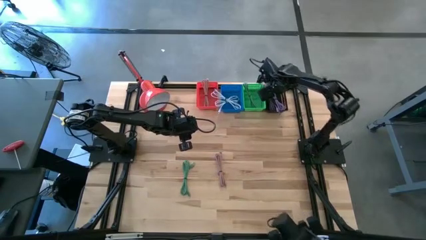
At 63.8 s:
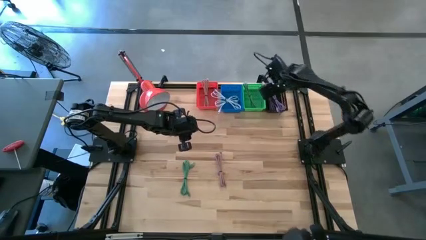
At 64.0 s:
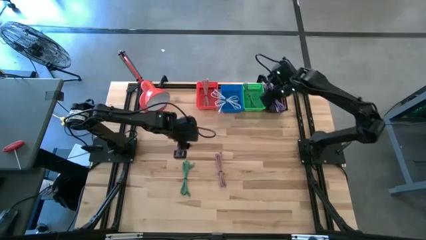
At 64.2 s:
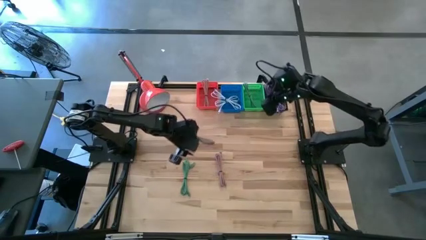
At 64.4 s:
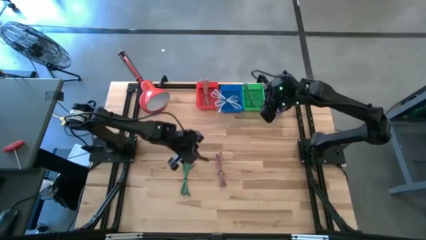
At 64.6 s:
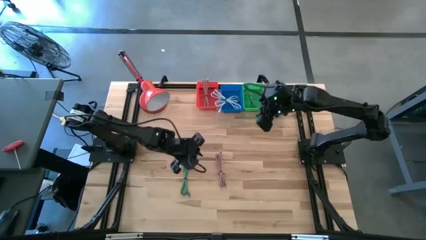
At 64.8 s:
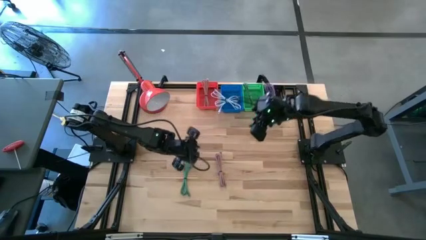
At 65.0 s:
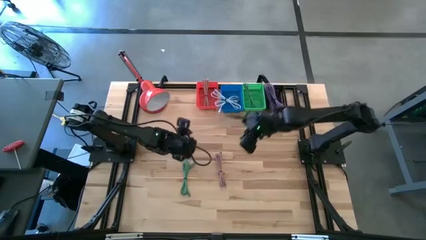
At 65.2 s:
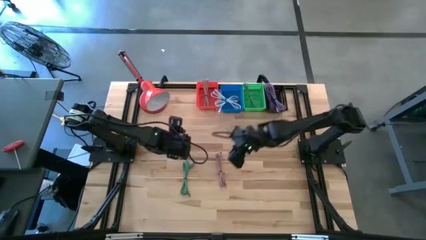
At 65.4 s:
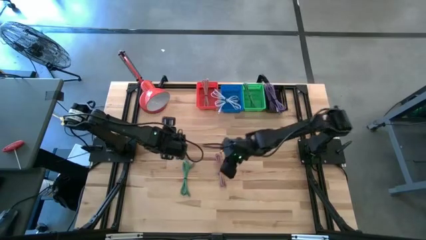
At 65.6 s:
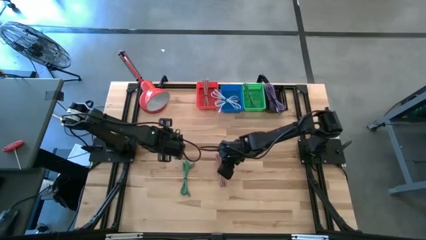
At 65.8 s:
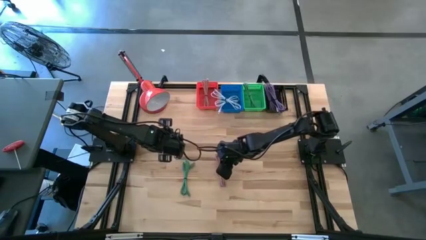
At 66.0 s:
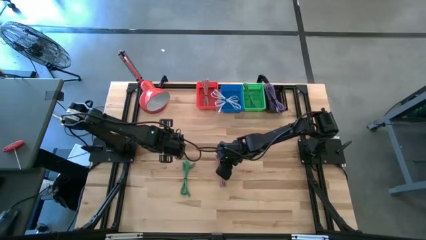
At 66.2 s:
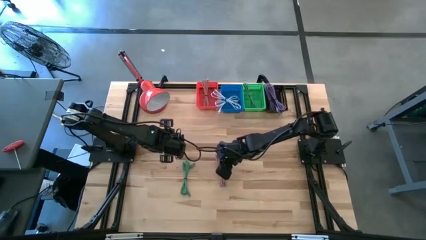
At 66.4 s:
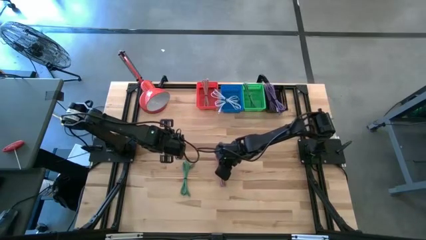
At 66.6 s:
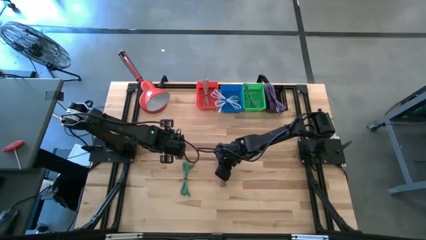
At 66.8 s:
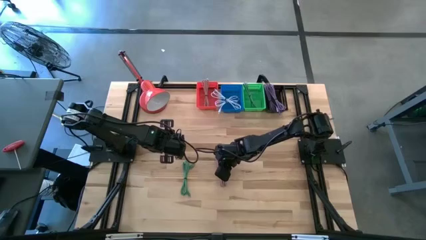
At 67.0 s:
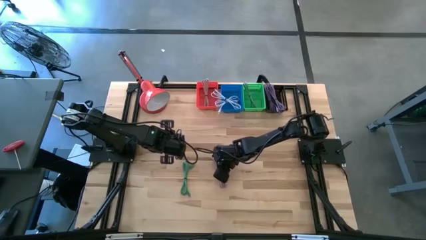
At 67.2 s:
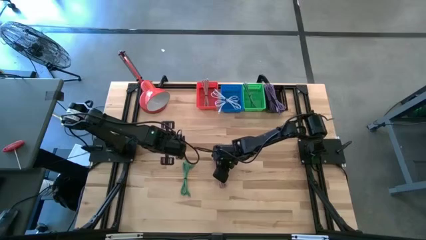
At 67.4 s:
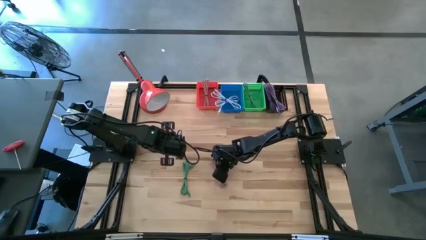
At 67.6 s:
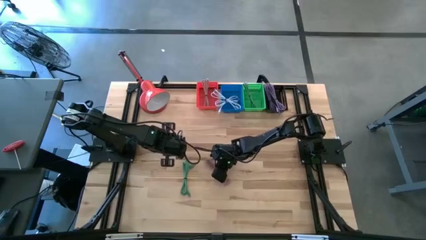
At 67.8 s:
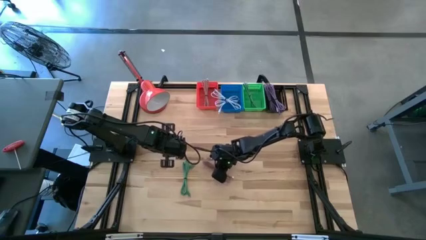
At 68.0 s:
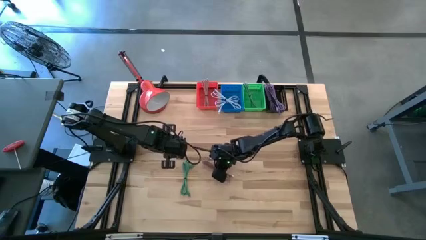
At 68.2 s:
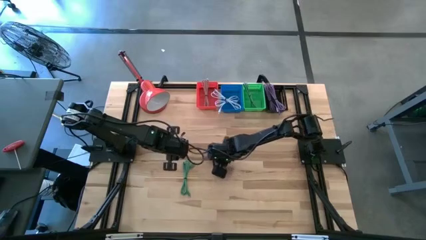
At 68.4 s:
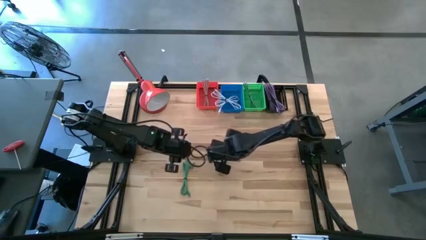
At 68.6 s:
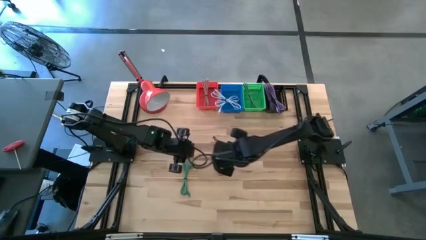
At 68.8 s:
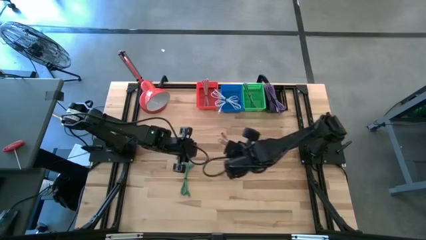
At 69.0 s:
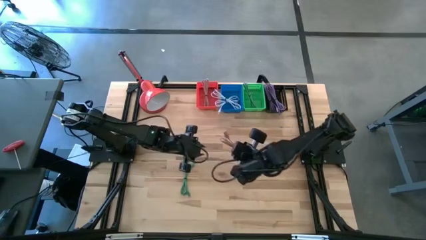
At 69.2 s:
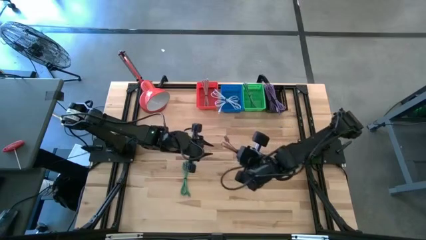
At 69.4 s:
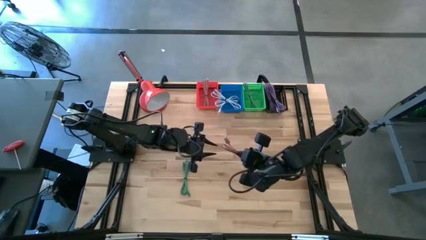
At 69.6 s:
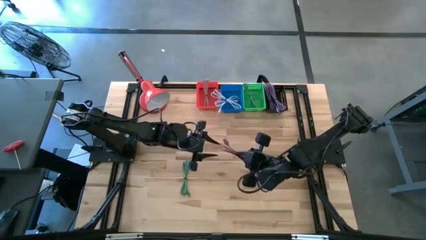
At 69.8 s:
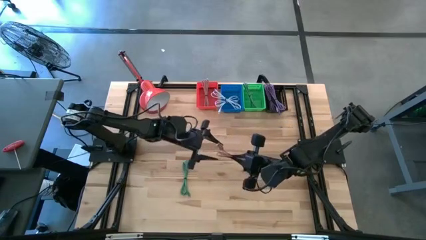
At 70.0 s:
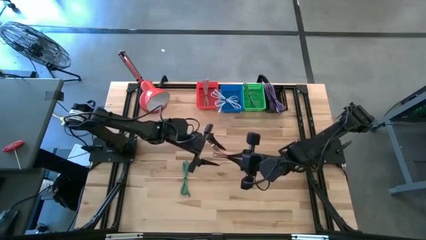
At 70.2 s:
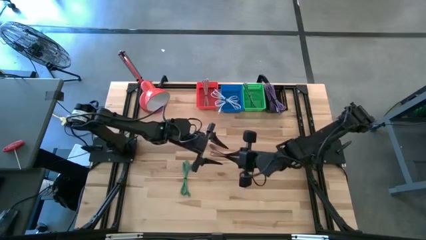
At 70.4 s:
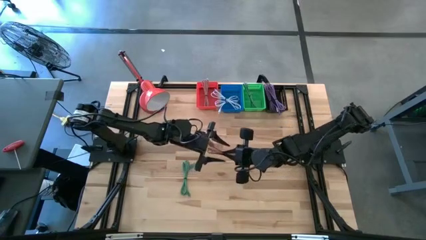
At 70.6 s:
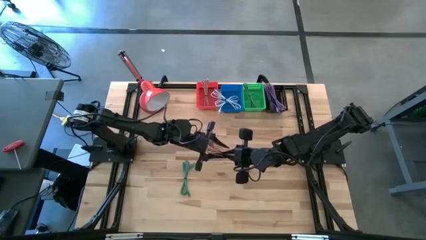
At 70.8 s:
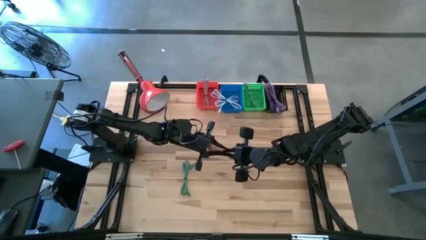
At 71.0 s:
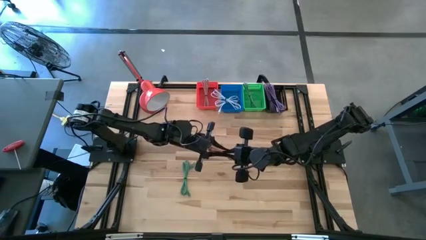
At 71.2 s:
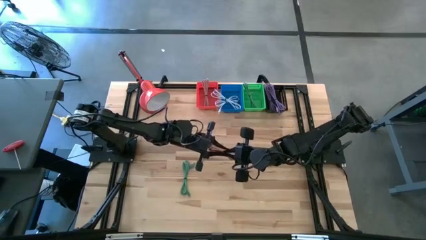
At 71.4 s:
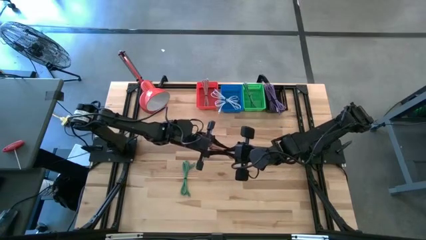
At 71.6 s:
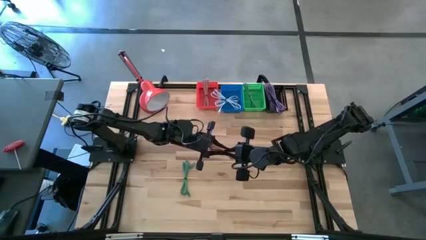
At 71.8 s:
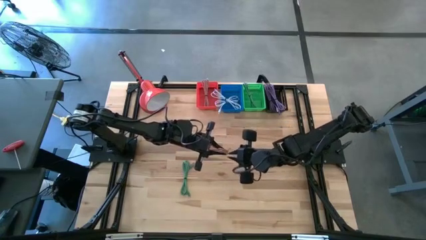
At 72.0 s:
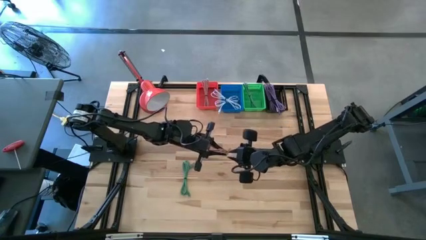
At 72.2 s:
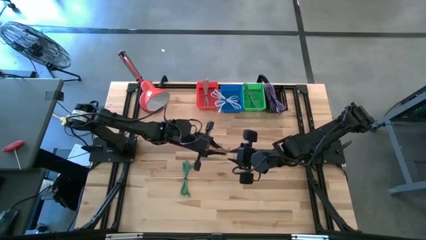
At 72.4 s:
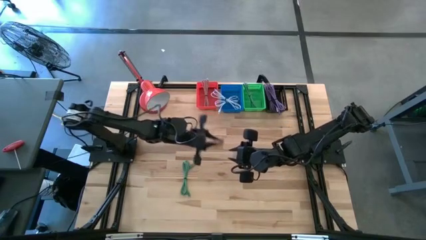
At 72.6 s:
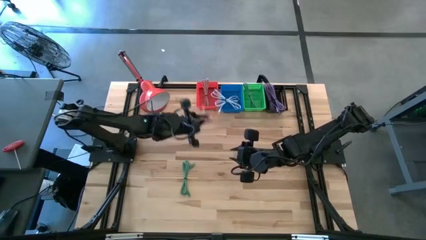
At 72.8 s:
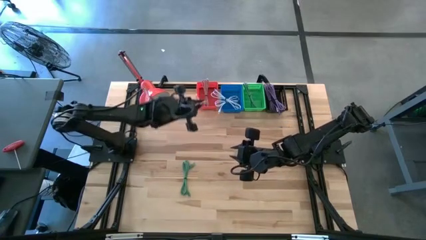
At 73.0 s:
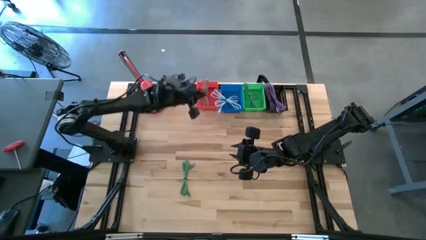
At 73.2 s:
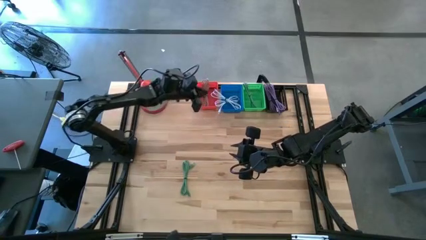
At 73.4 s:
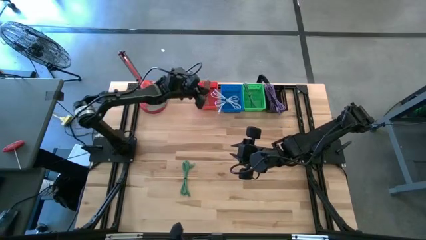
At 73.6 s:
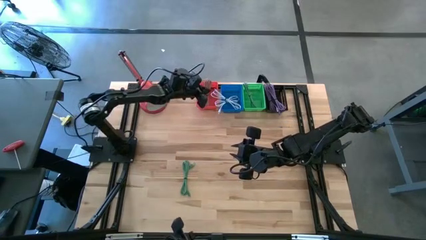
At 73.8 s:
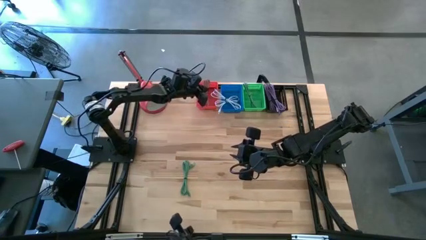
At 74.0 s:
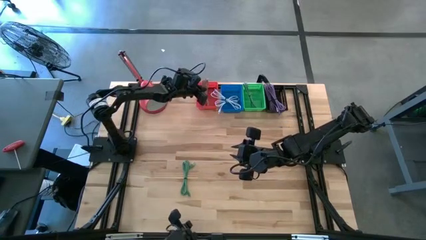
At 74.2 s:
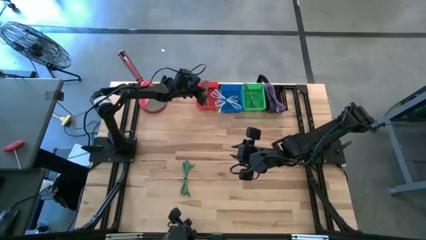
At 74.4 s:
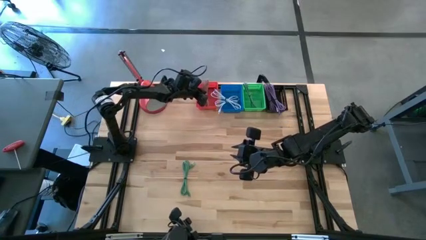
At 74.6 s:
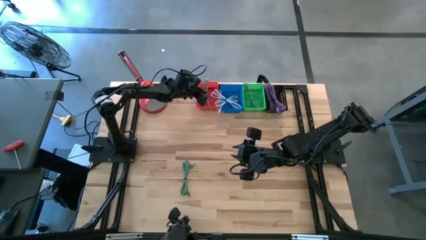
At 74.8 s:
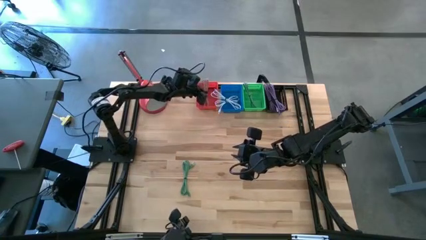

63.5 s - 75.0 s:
Task: Pick & Place USB Port
Put the pink charger cable into the orange bin

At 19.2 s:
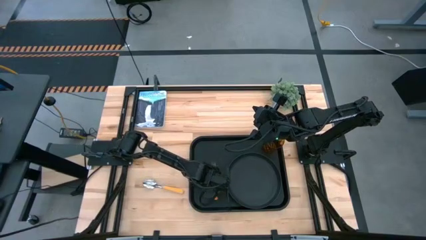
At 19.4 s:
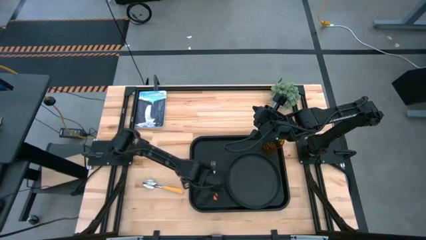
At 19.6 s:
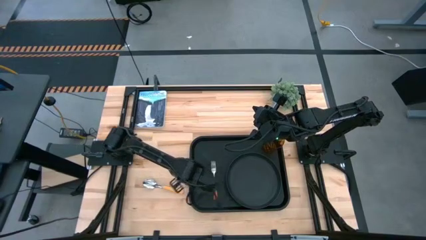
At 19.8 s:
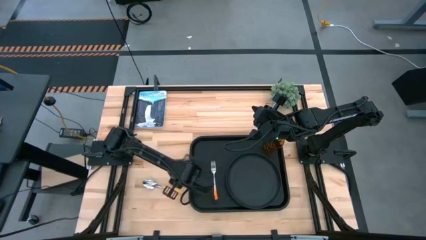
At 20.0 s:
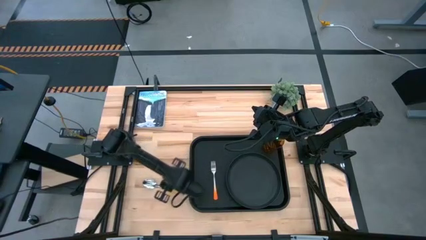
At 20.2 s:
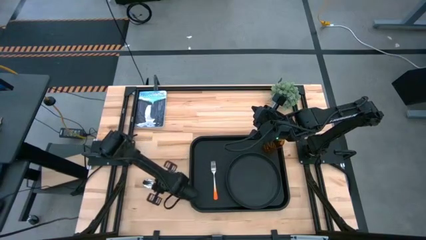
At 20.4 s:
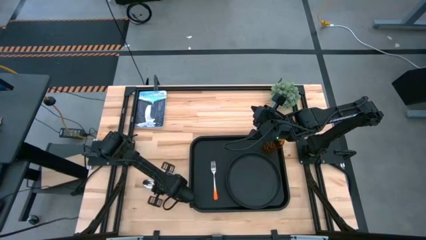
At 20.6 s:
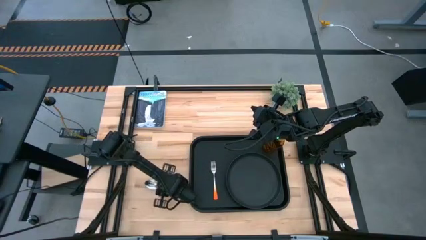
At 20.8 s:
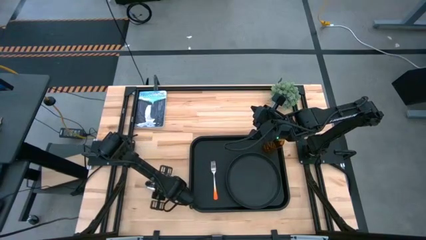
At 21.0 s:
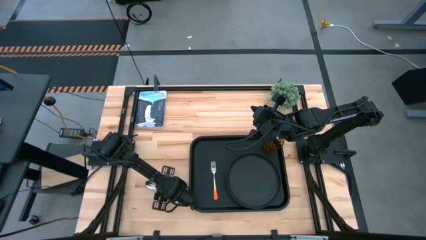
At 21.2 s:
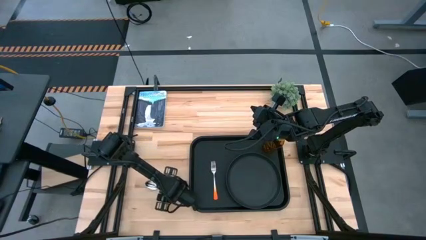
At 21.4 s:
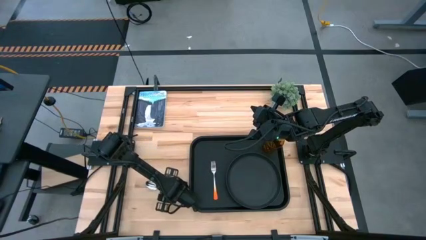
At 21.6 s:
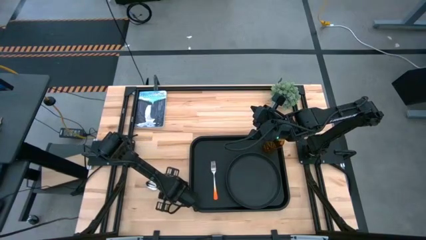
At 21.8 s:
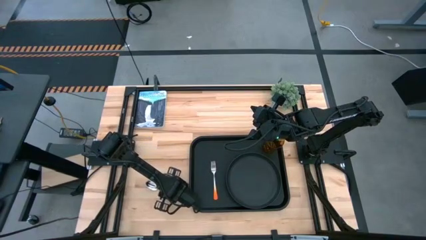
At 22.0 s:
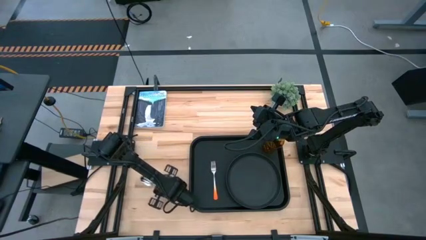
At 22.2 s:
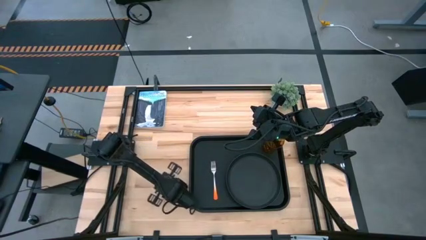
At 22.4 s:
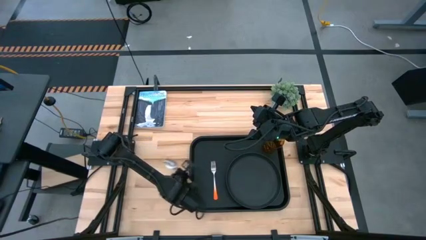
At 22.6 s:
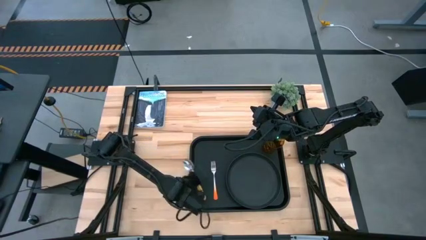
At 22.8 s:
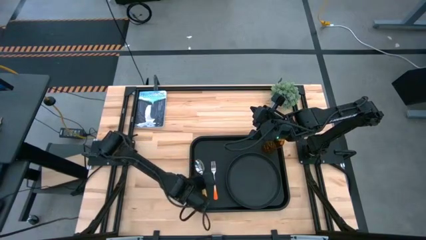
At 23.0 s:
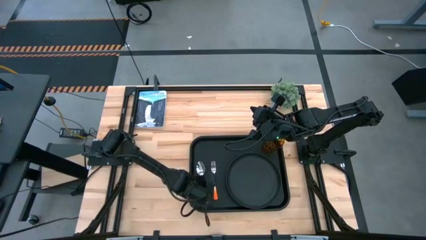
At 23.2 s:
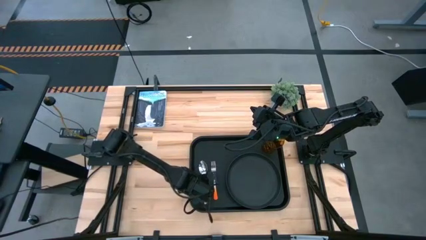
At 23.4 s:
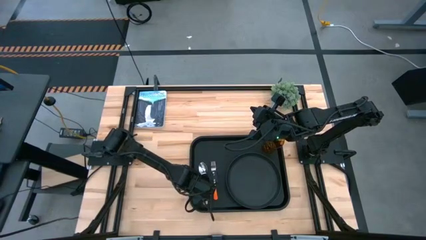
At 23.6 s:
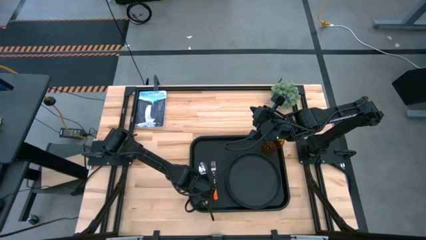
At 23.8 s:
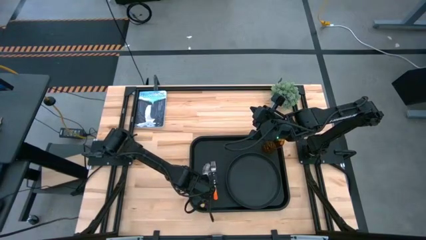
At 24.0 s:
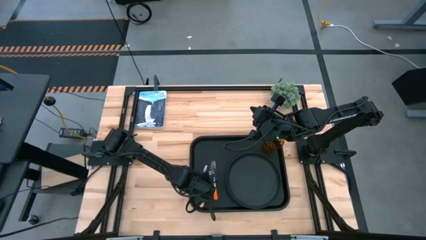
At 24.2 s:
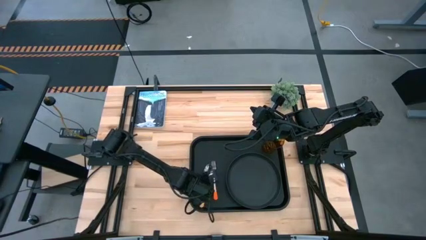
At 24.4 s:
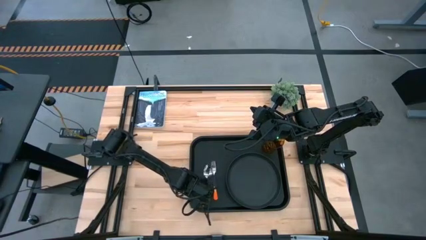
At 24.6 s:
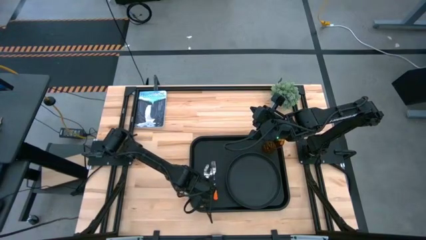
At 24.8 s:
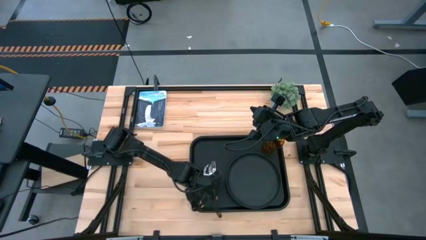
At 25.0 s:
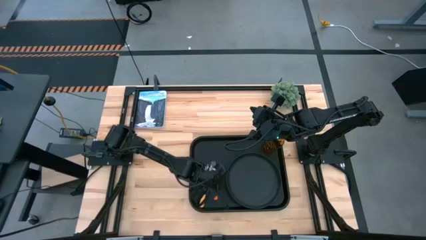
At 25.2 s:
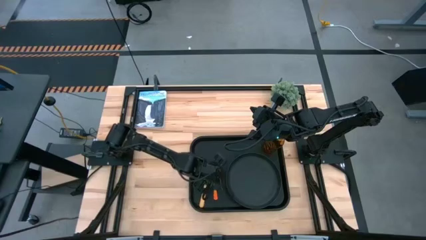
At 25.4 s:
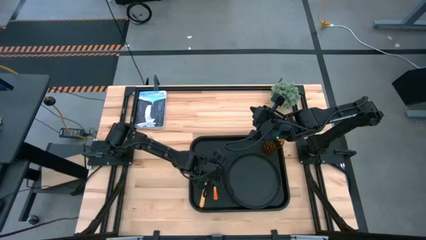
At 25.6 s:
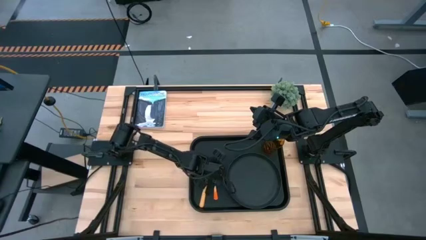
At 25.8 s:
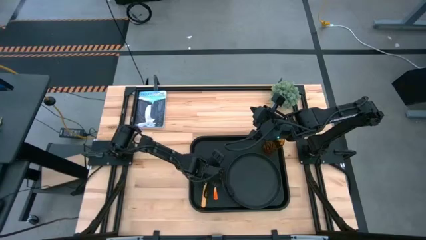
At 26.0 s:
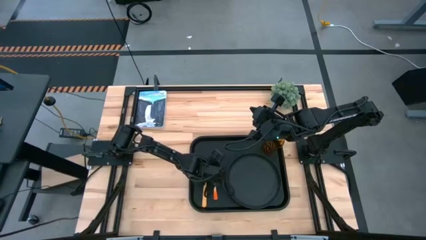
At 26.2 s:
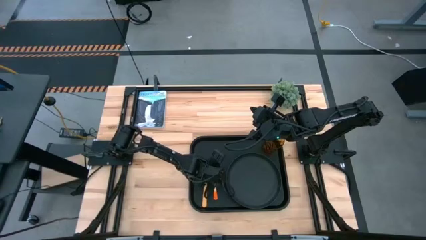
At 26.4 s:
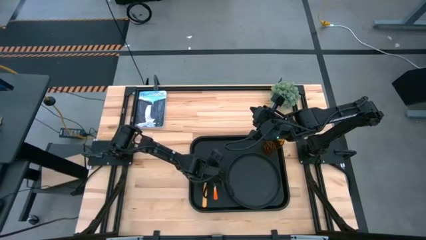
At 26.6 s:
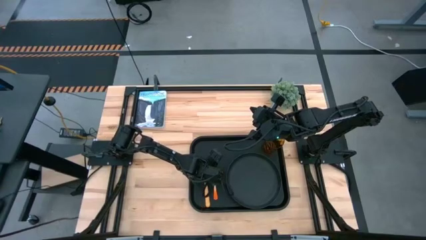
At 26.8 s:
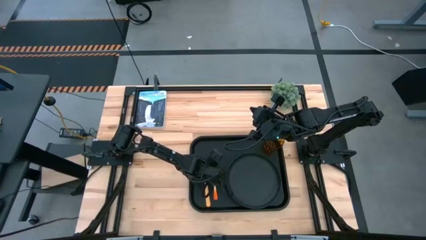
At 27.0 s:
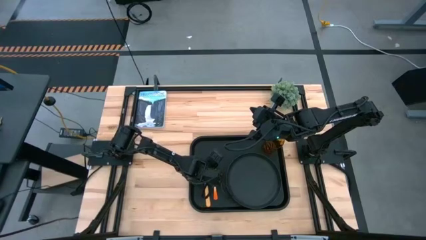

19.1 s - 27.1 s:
Task: Pick and place plate/cup/fork/spoon on tray
Put the yellow spoon on the black tray to the left of the orange fork
